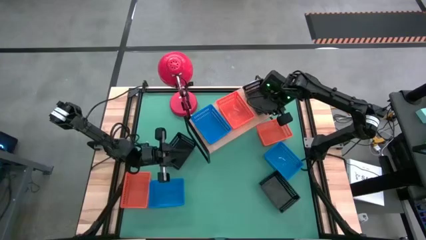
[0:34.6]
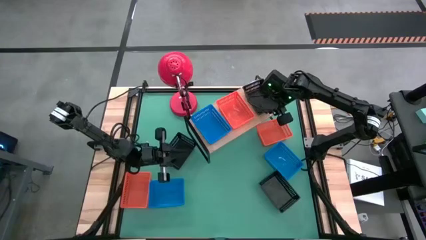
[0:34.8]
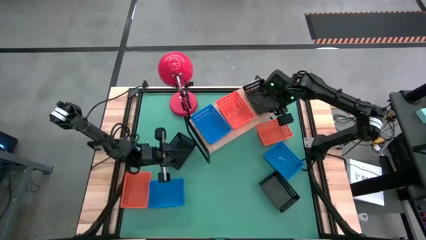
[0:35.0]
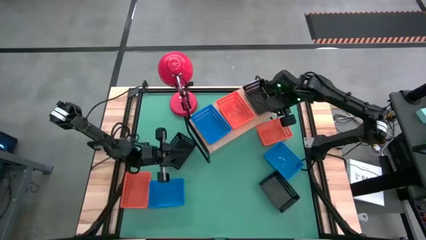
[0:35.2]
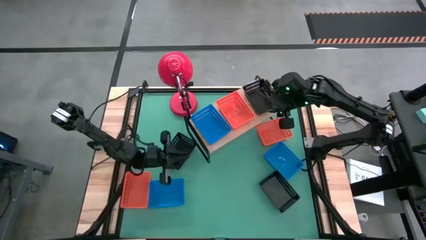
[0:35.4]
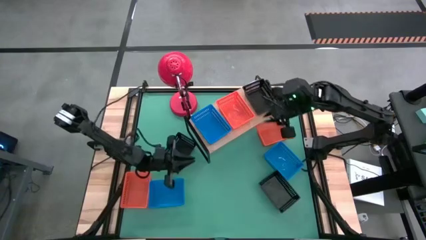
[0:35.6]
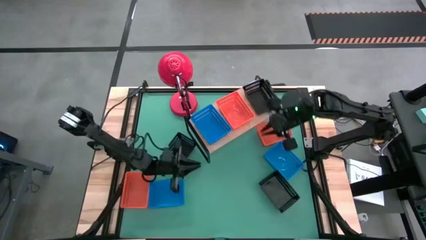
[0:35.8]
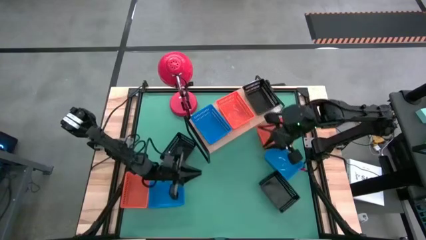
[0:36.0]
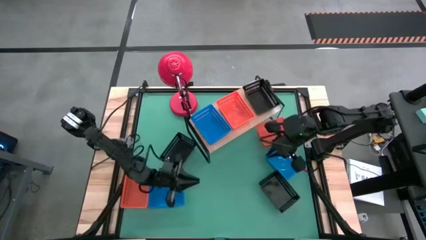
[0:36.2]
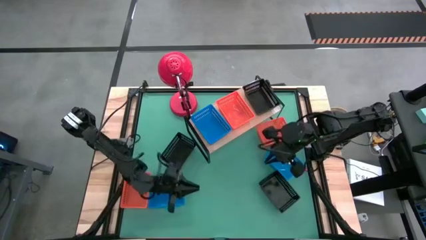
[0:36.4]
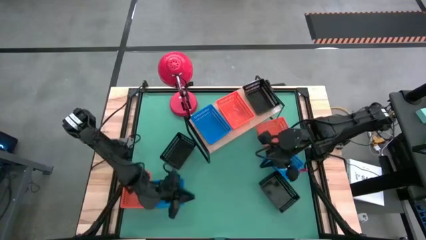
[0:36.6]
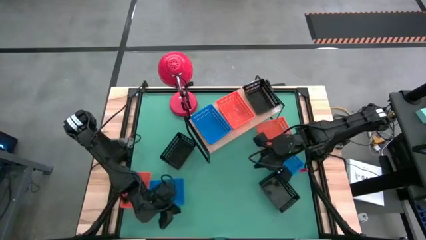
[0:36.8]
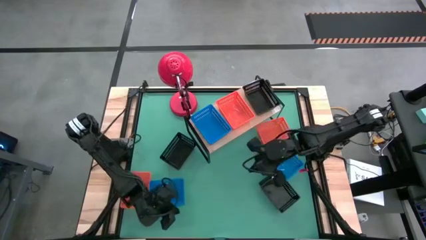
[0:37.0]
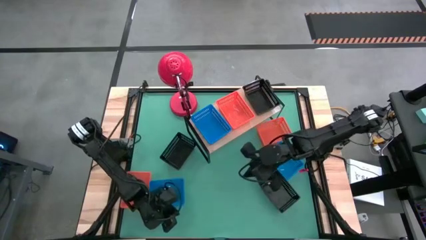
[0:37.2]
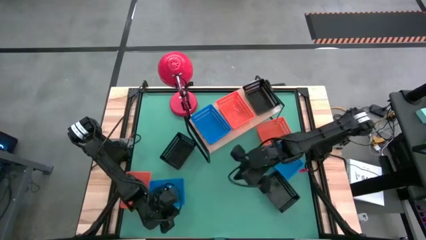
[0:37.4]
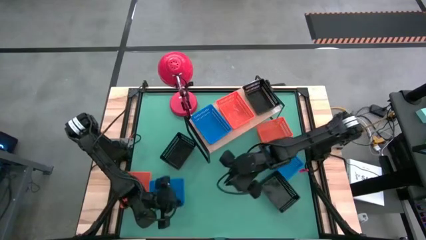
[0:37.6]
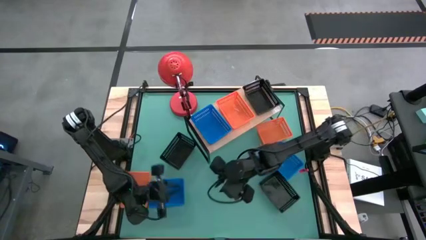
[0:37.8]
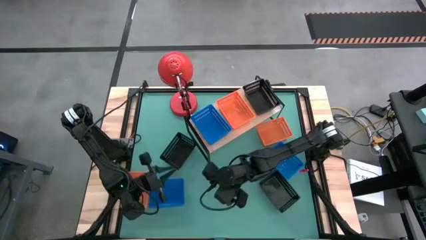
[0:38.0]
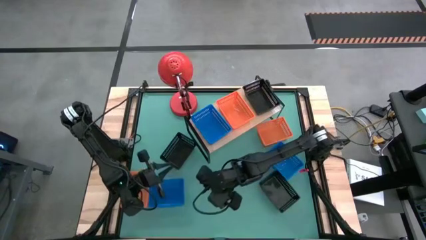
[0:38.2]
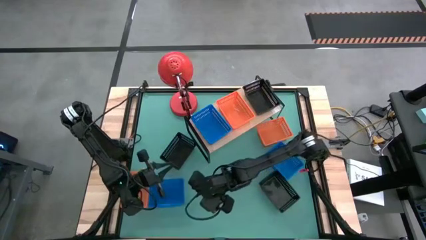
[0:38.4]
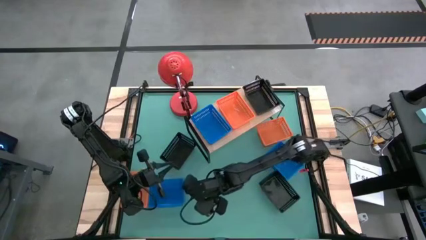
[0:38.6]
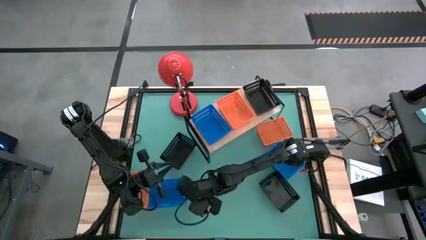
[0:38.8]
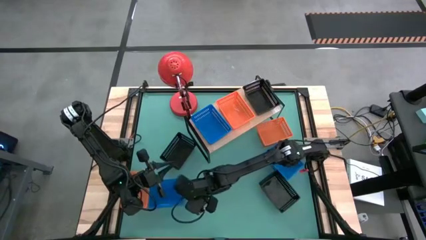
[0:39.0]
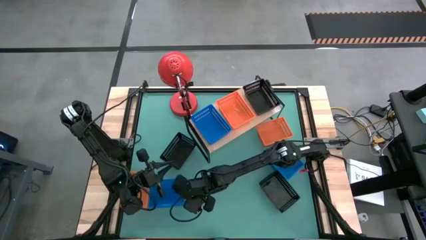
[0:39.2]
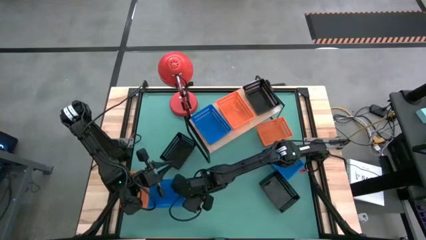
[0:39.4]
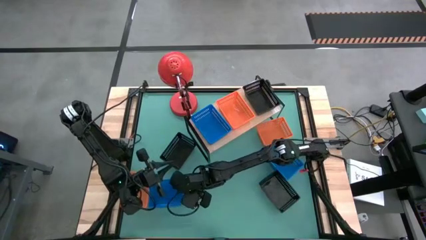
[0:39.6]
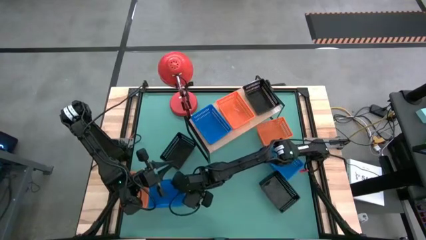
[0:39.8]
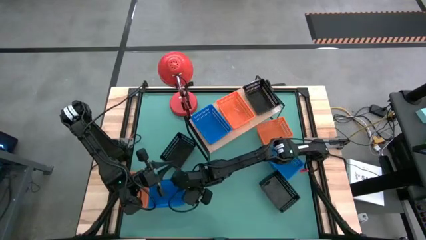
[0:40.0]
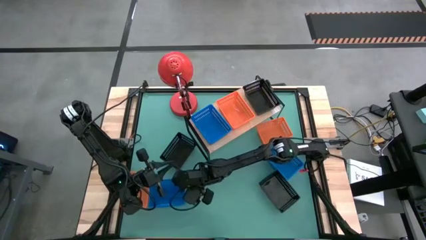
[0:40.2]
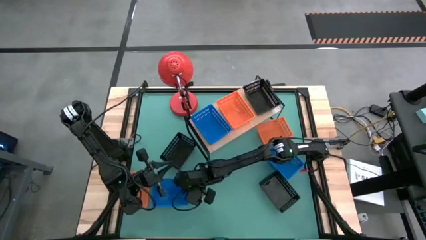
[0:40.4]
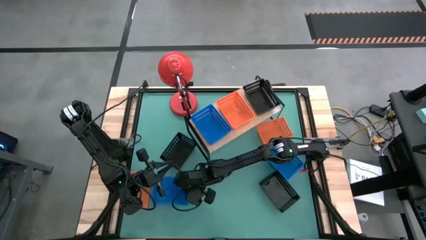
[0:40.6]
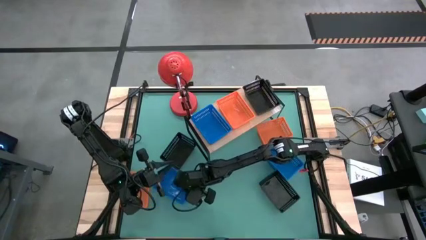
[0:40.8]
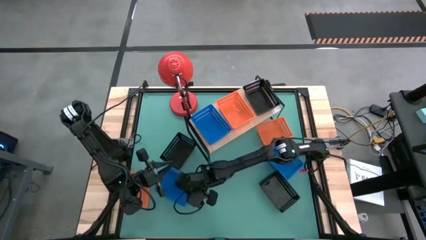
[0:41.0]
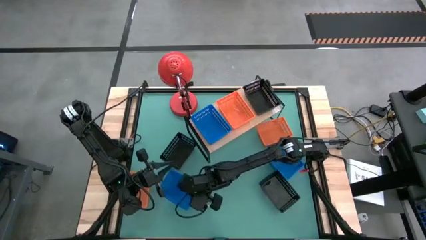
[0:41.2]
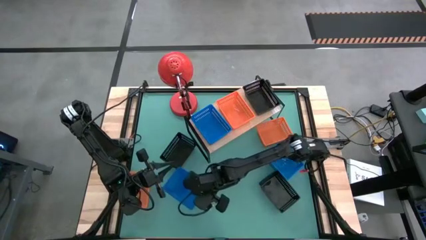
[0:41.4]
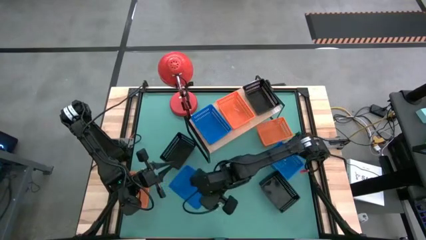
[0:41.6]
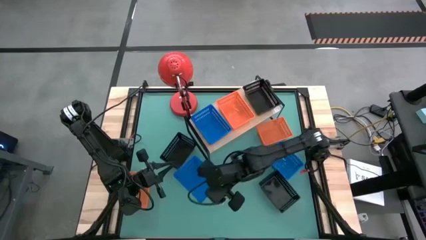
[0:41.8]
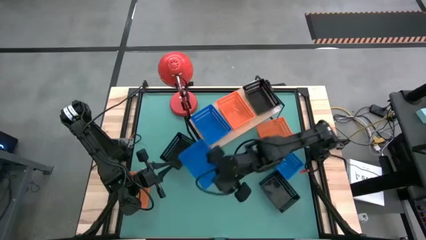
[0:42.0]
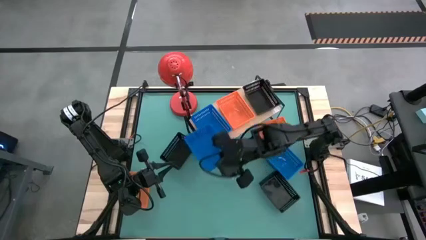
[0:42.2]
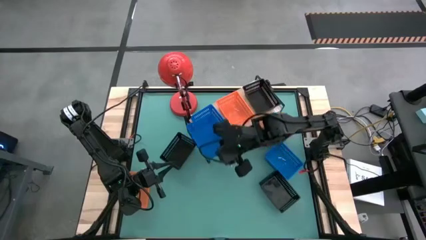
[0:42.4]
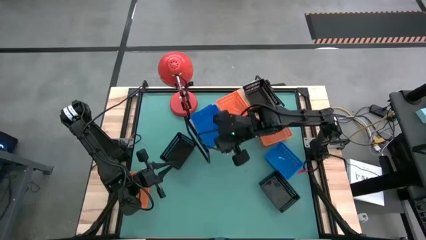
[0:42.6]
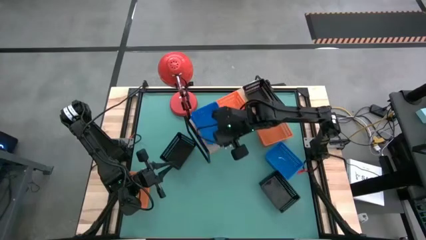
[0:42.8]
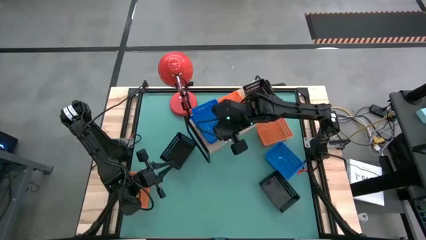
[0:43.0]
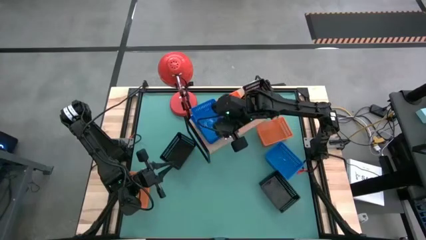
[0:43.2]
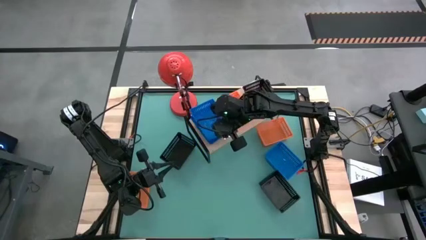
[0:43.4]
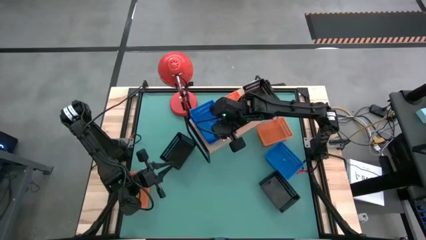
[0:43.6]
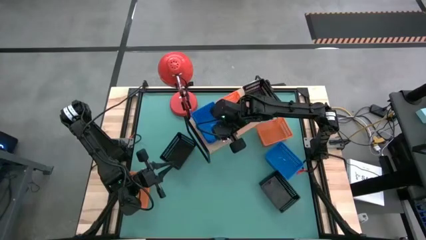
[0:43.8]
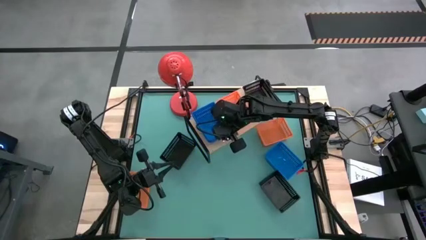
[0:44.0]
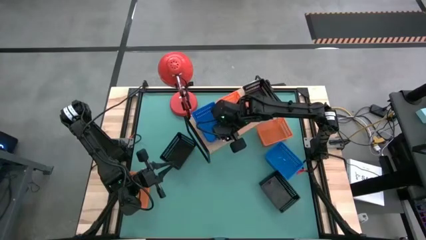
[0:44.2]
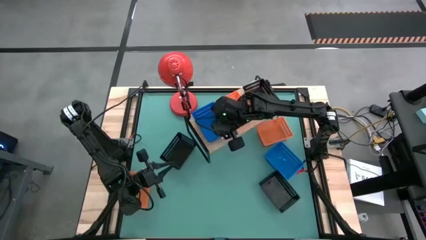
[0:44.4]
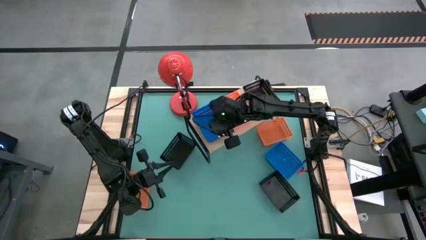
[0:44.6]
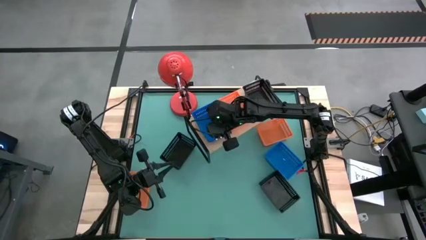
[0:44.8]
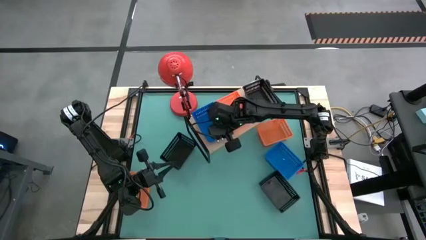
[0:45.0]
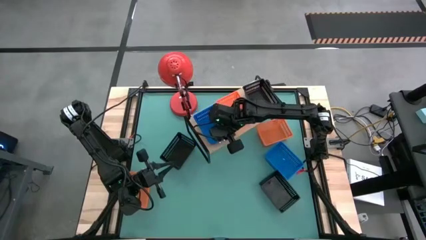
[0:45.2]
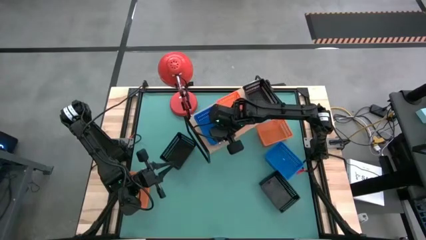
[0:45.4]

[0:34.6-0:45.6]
Task: Stack baskets on shelf by color
Stack the left blue basket on top of the blue basket on the shelf

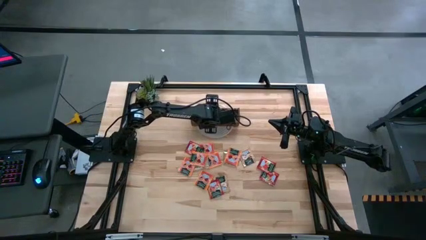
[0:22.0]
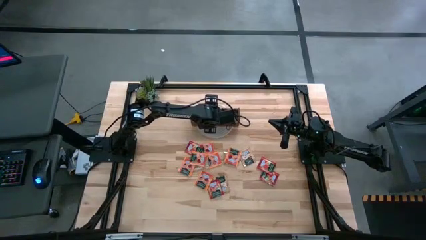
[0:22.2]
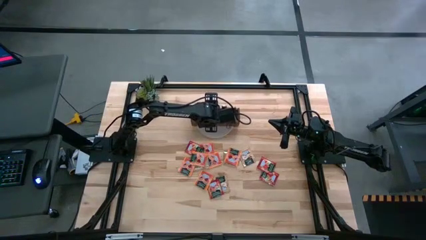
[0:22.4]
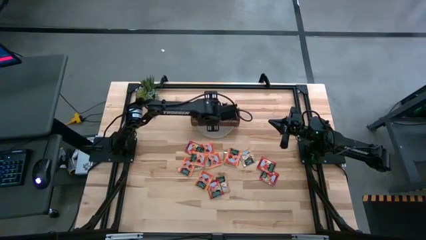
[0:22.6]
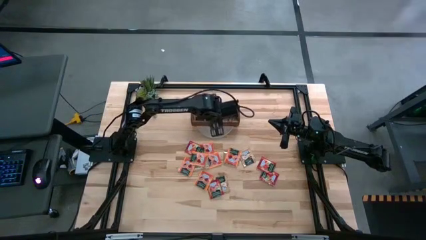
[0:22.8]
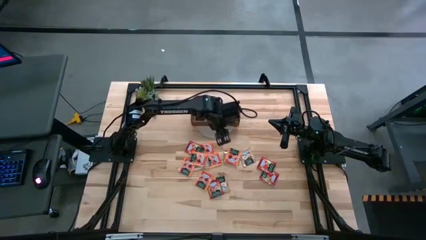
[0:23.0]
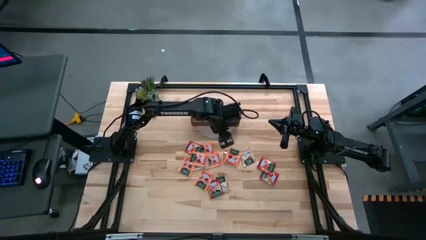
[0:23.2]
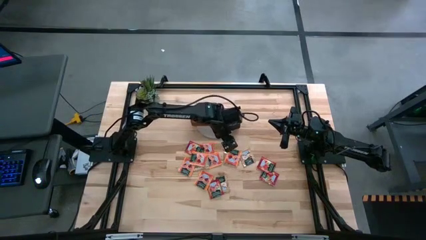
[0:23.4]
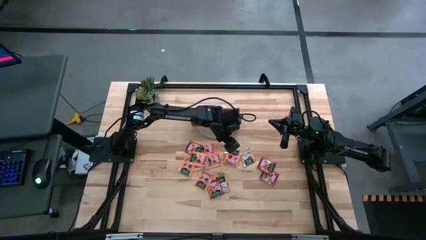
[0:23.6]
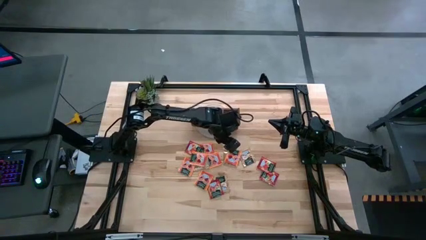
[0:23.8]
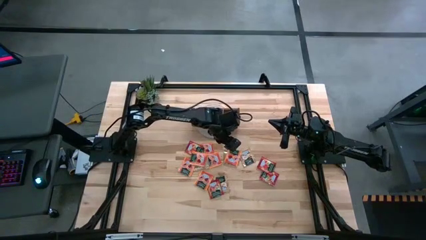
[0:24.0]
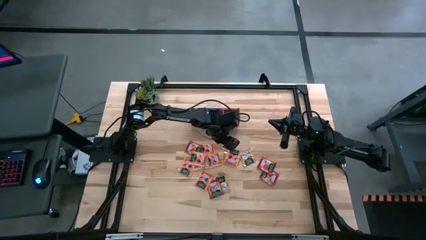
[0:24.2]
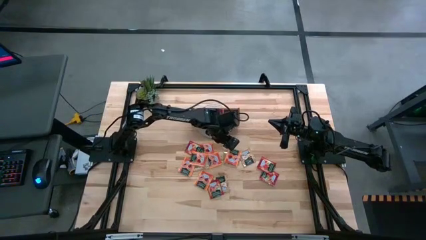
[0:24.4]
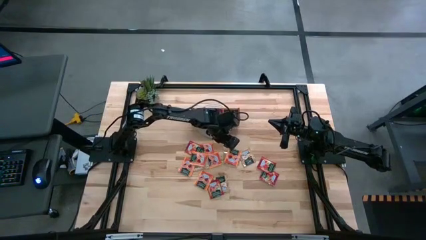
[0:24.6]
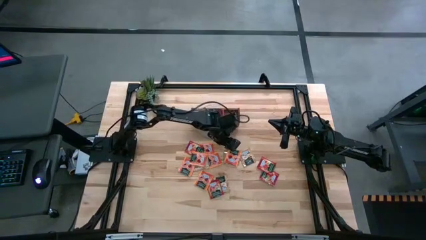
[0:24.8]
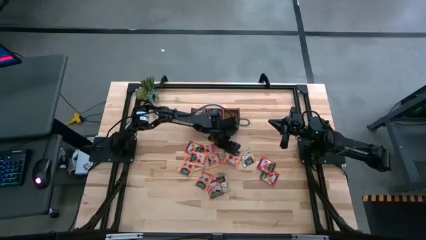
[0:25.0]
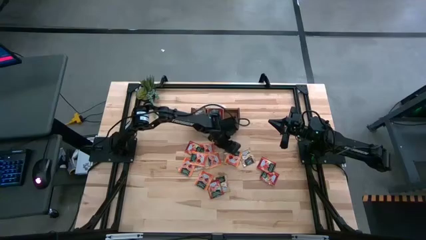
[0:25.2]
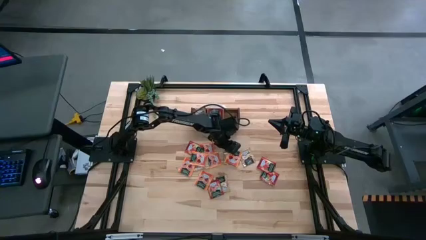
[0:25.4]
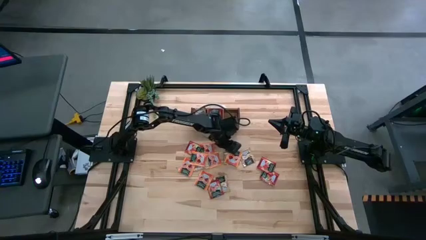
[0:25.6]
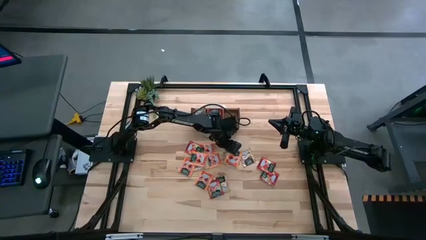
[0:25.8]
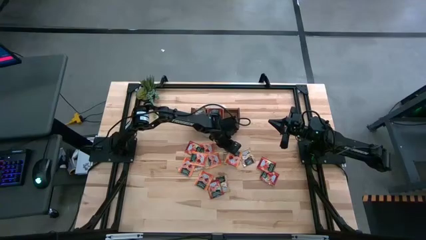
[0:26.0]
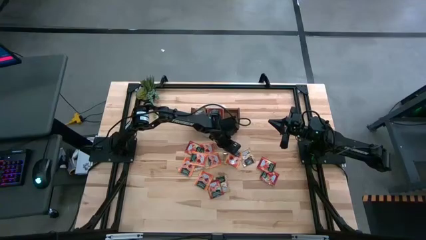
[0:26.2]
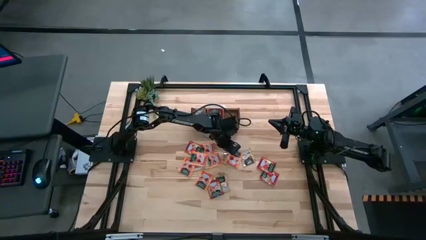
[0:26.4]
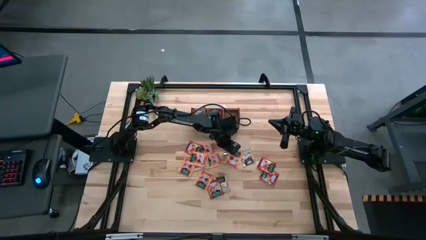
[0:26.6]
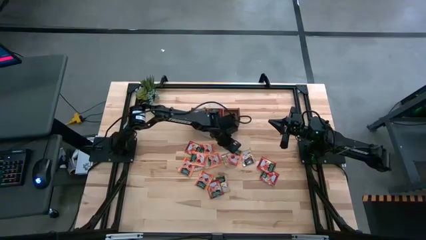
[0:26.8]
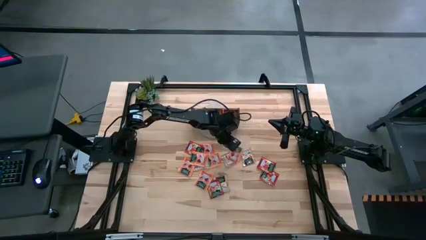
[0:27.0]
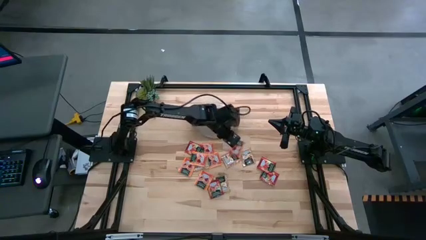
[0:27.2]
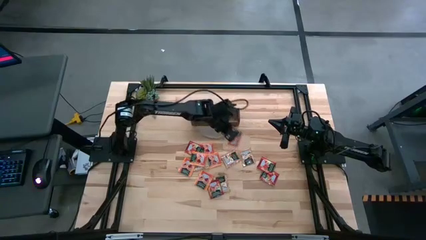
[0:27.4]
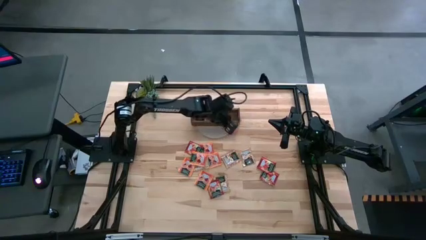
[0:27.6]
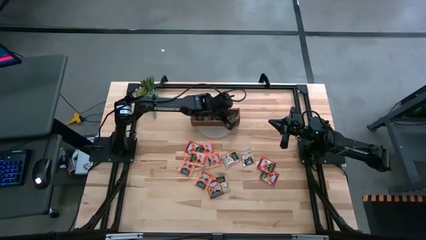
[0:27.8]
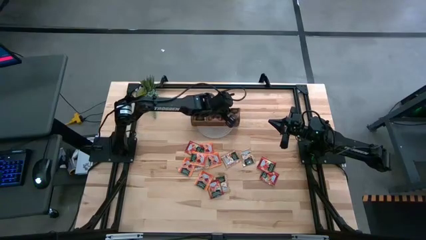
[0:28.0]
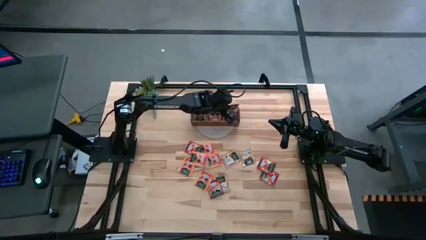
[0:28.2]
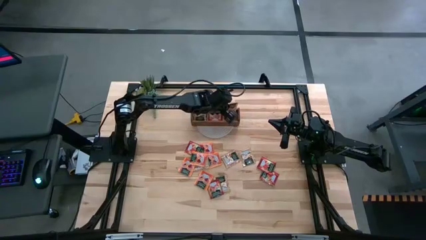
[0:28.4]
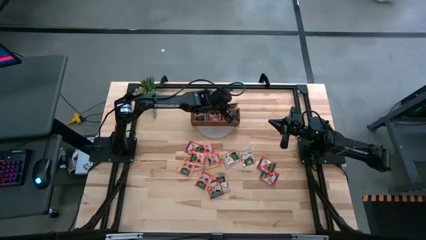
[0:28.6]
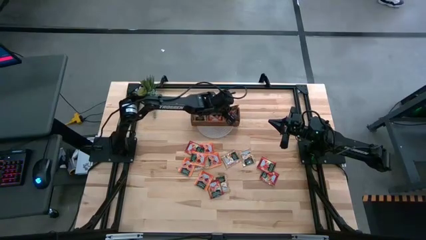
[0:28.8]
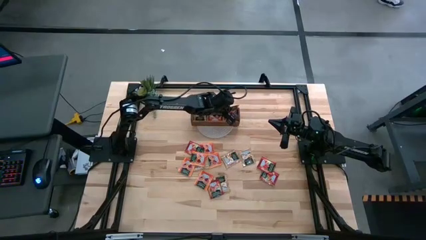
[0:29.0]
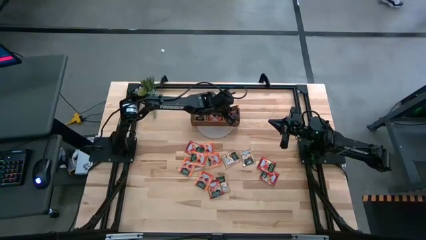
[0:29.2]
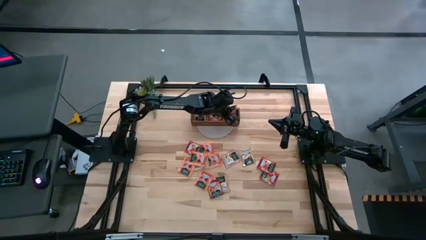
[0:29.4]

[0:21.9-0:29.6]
Task: Pick & Place Tea
Put the orange tea bag in the right section of the wooden organizer
